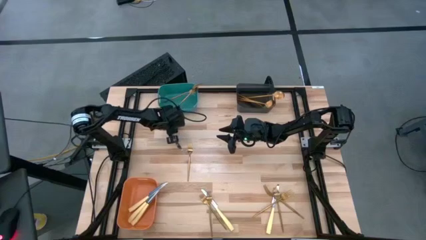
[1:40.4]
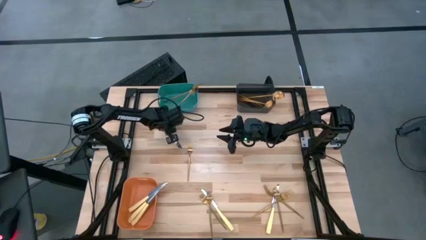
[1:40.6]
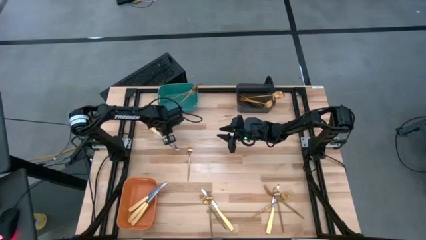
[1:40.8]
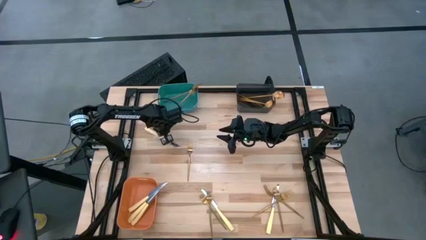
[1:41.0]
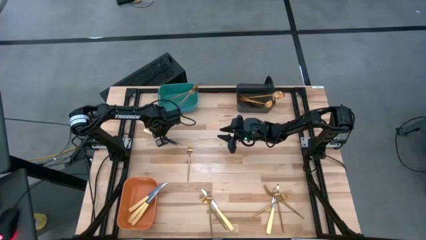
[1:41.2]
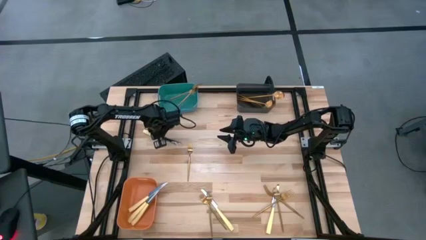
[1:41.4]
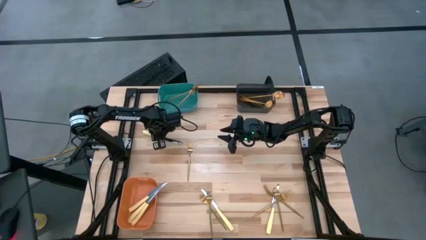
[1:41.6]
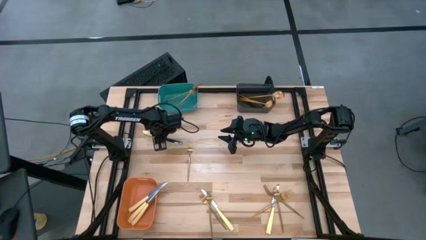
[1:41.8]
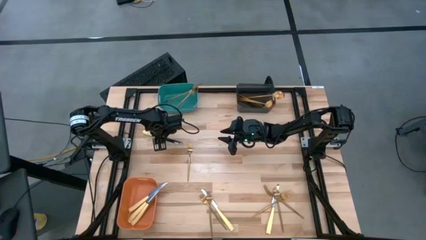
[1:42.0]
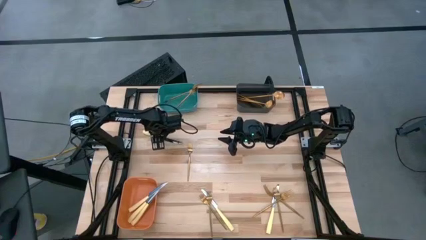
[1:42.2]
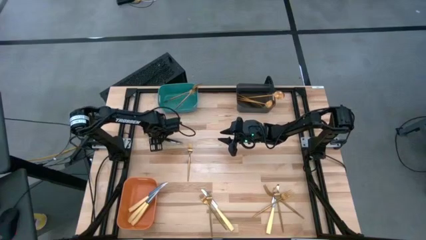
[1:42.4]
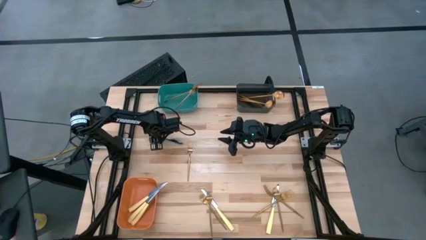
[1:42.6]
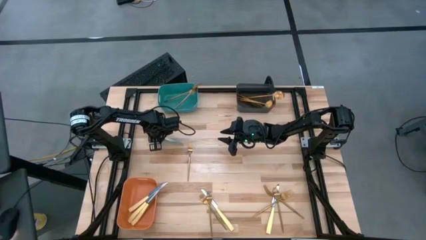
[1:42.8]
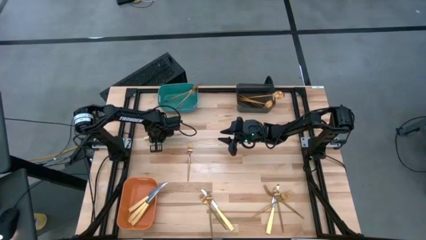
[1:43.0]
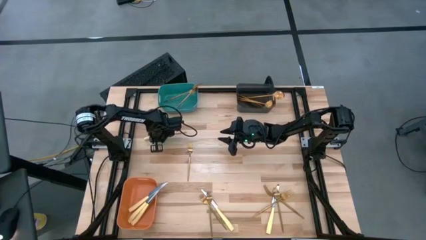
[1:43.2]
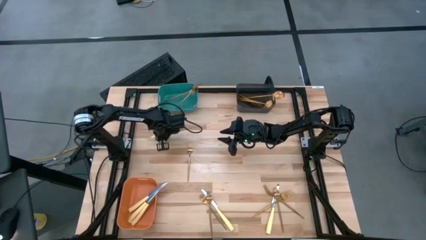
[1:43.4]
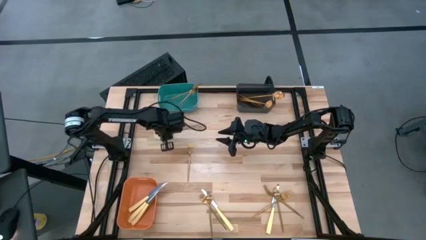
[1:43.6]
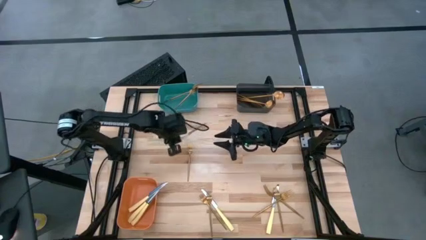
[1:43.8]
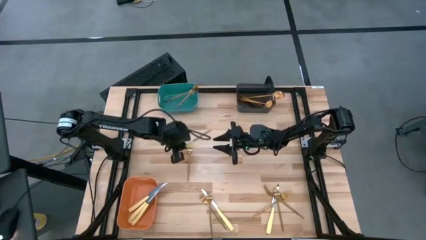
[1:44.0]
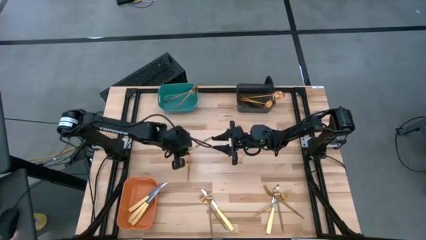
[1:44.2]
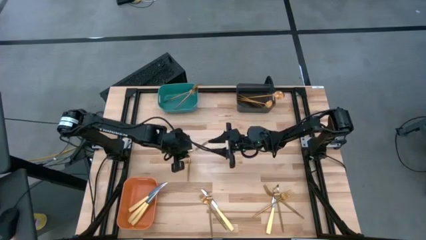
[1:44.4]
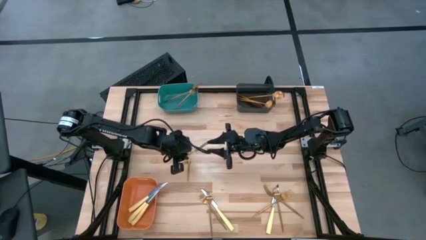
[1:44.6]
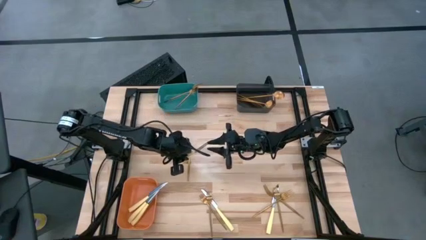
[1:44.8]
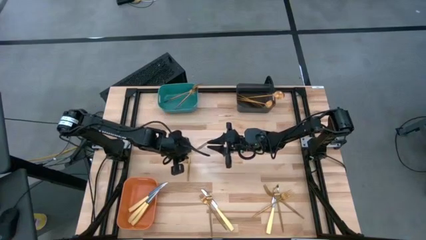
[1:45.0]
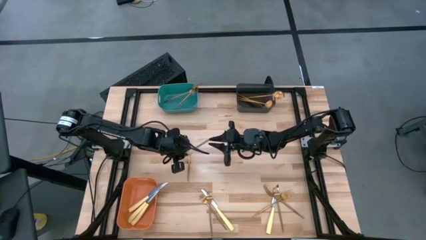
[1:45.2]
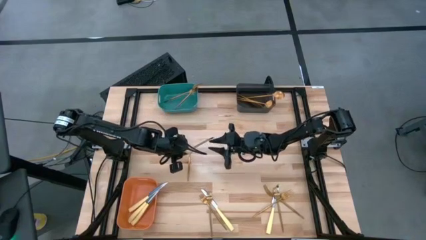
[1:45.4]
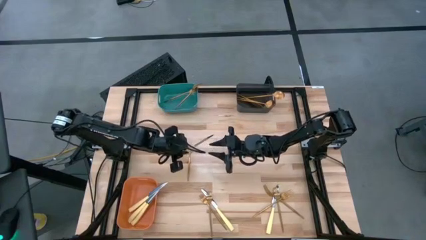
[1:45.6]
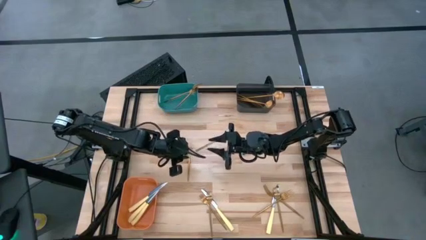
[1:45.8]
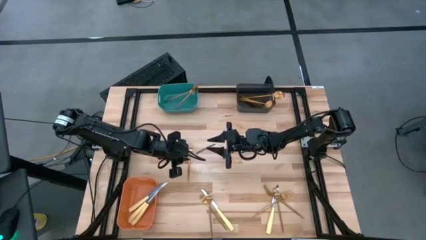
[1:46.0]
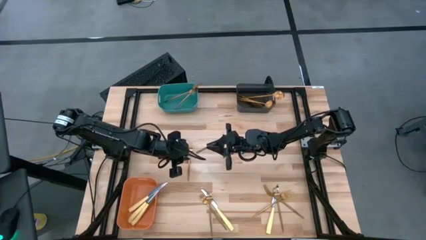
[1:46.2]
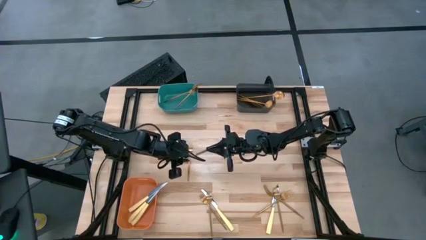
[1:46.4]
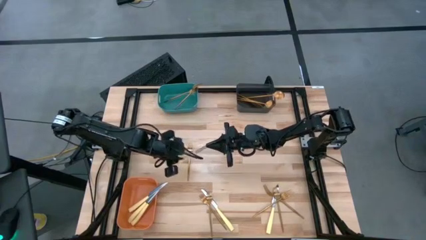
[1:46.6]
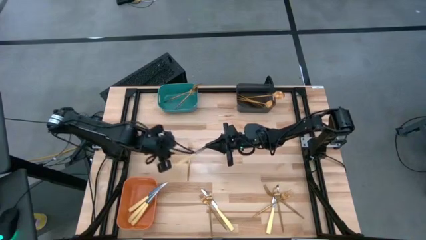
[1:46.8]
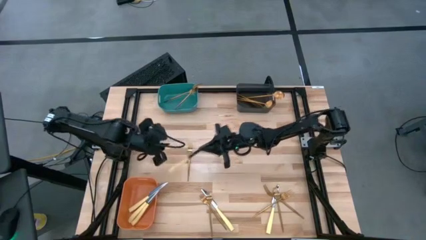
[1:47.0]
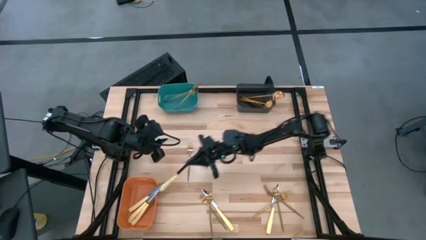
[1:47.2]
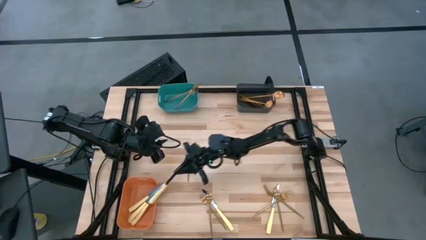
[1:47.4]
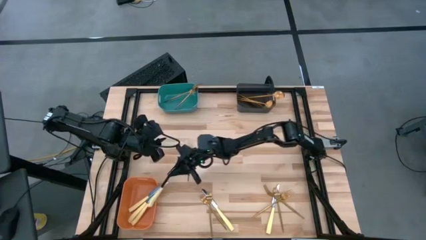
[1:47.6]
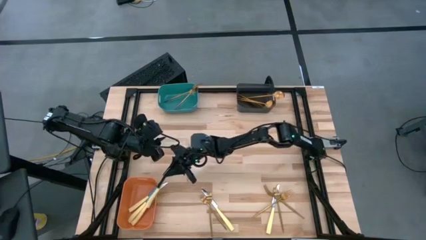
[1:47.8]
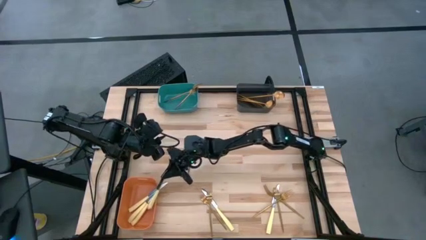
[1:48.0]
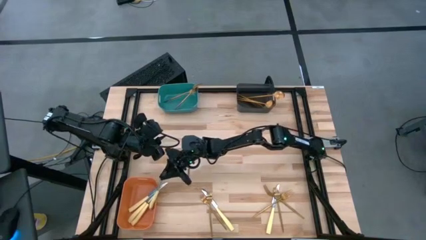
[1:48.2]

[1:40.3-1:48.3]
Task: Sort silverware by color (type)
Put the yellow table knife into the orange bin

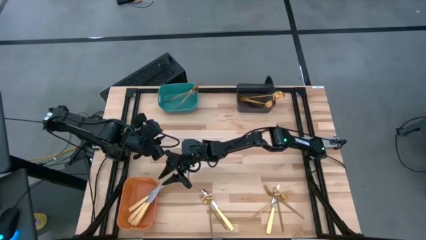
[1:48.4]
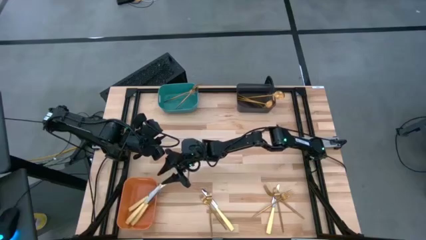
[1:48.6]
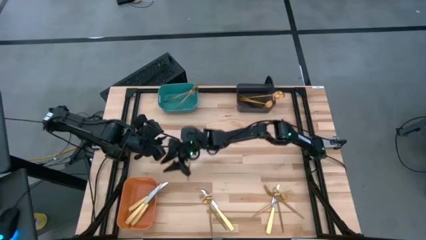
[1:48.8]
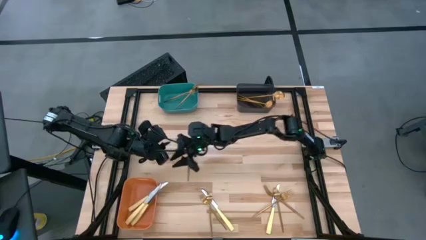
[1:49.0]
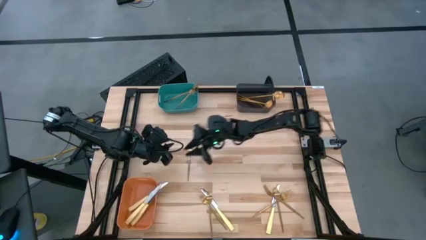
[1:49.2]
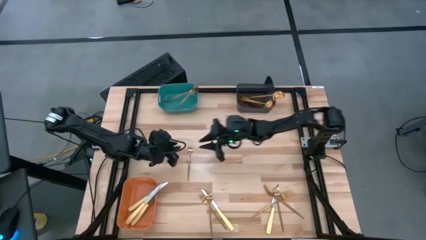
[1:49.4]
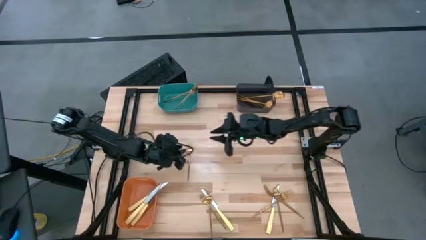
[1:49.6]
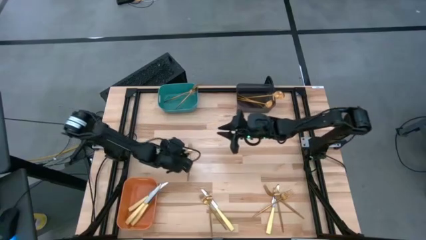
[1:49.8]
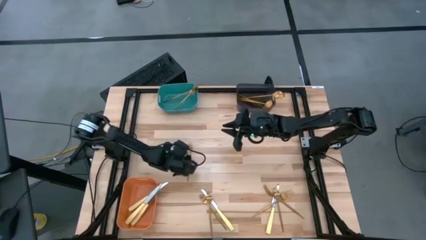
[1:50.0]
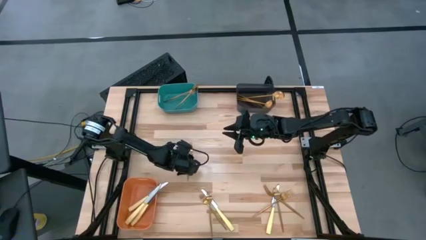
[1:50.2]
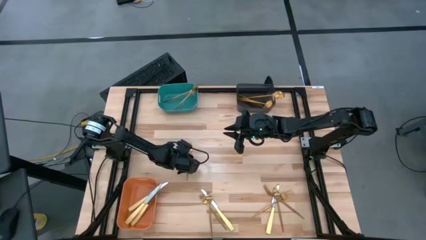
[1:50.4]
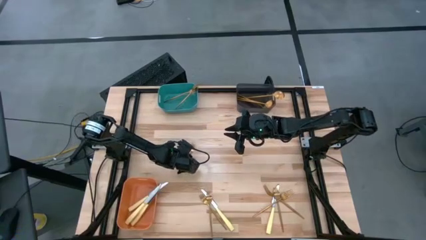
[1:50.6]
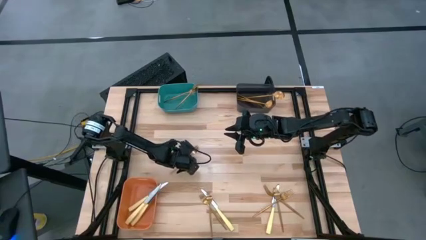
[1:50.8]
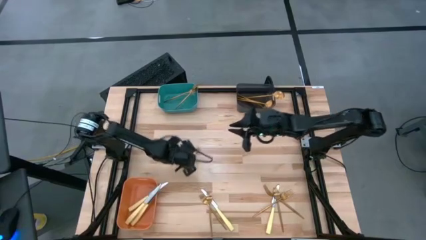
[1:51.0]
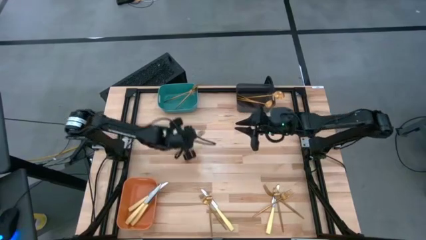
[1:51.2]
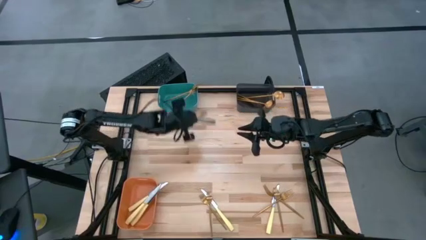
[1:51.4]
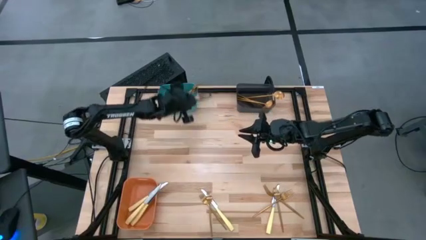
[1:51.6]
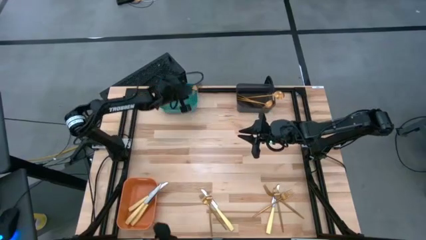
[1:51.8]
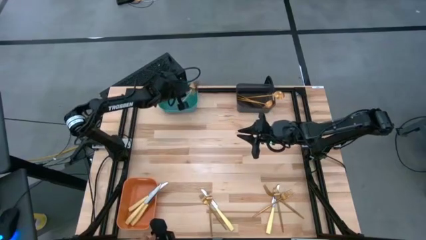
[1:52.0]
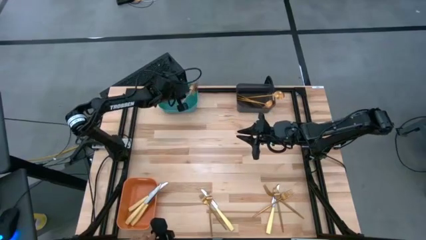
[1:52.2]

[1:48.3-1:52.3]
Put the gold fork into the green bin

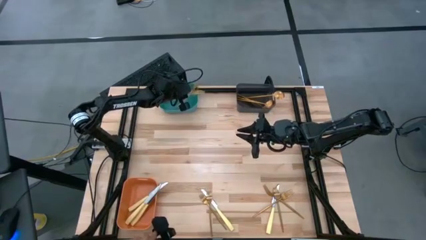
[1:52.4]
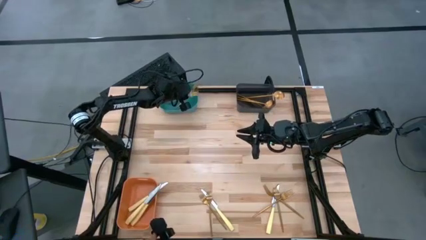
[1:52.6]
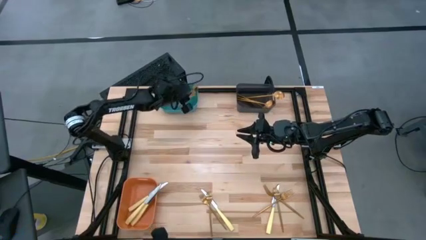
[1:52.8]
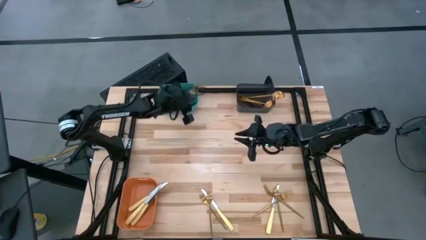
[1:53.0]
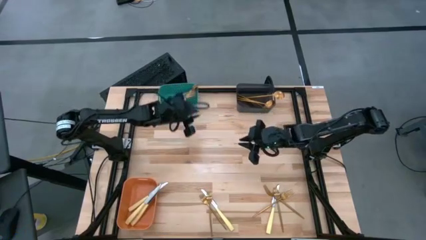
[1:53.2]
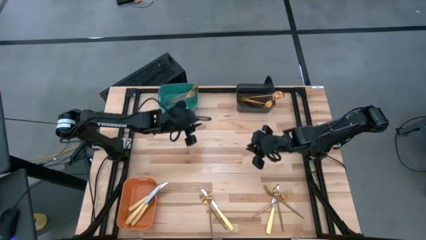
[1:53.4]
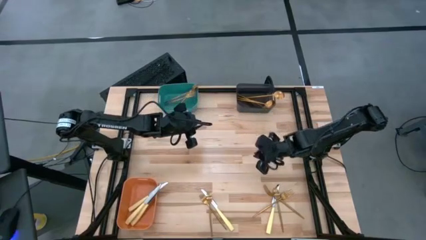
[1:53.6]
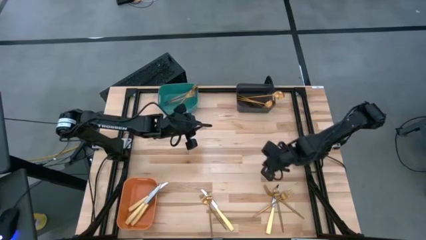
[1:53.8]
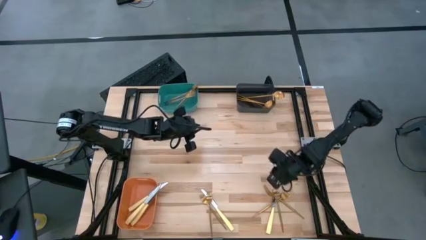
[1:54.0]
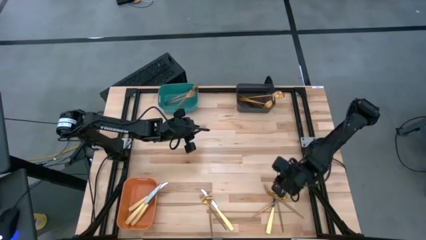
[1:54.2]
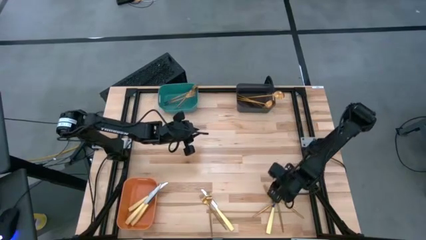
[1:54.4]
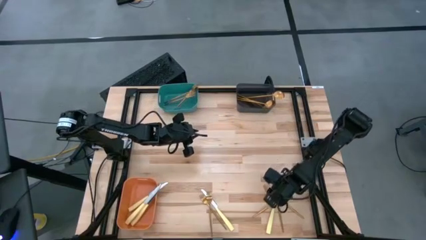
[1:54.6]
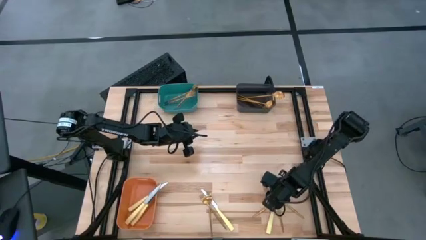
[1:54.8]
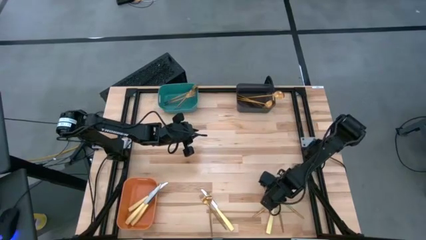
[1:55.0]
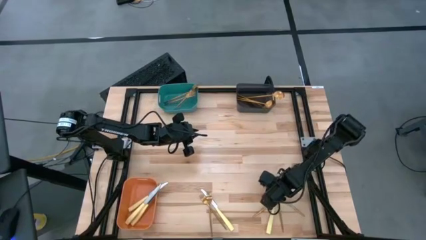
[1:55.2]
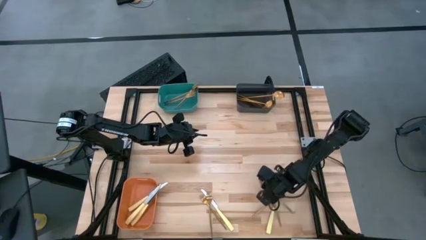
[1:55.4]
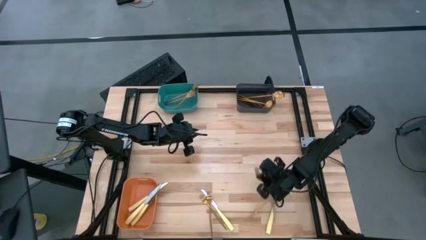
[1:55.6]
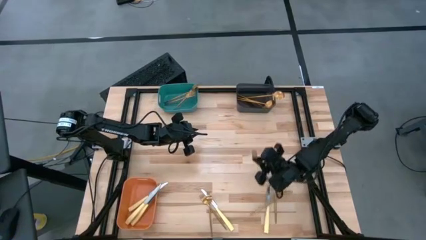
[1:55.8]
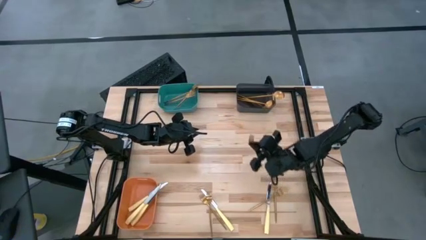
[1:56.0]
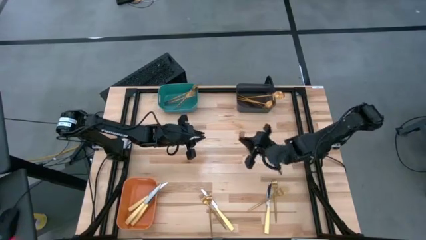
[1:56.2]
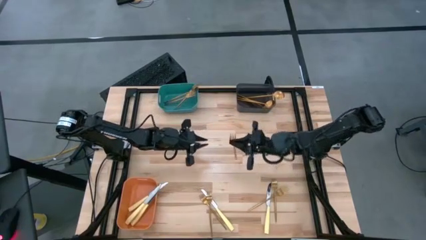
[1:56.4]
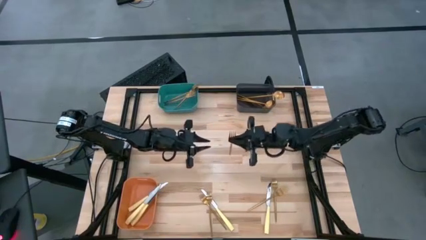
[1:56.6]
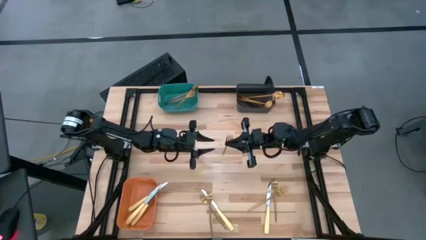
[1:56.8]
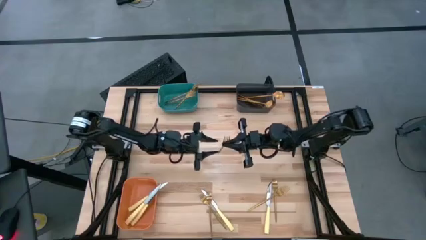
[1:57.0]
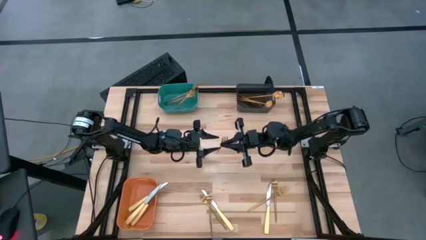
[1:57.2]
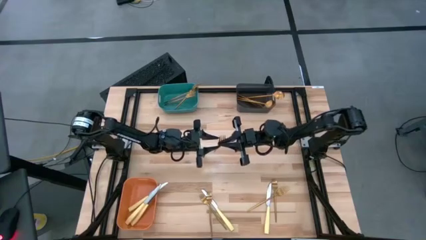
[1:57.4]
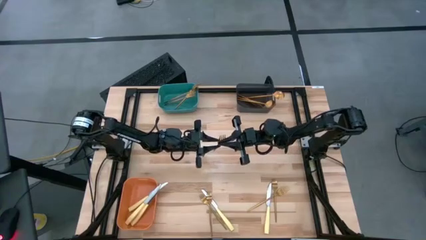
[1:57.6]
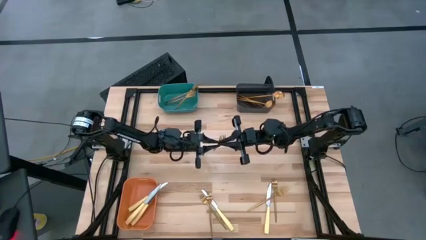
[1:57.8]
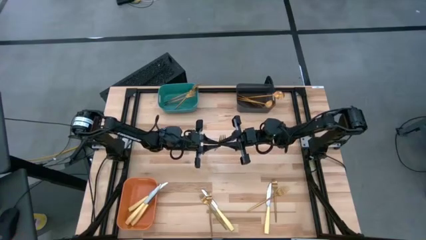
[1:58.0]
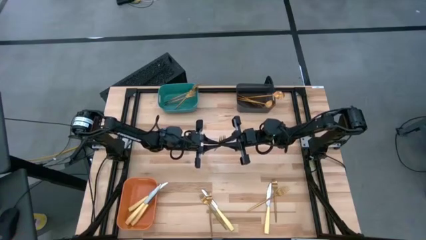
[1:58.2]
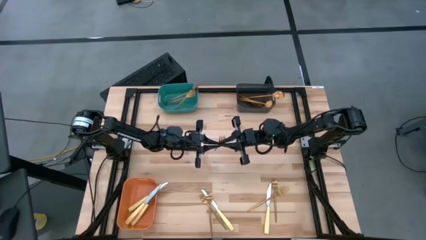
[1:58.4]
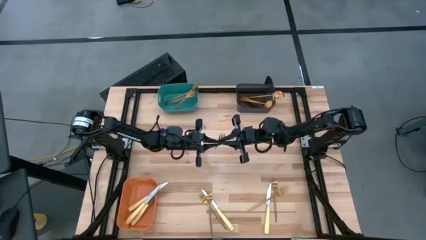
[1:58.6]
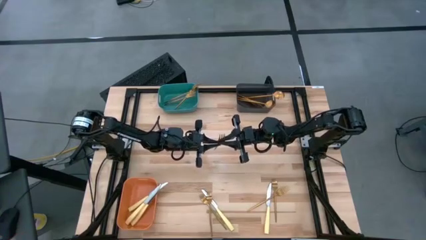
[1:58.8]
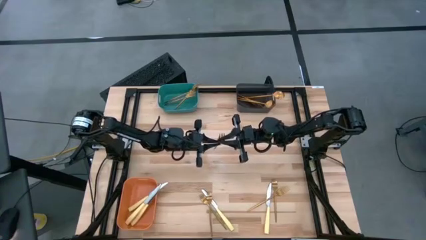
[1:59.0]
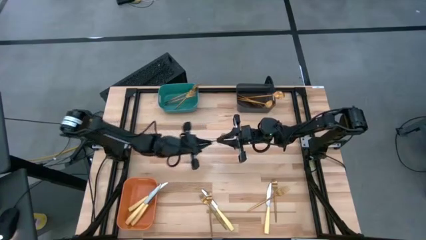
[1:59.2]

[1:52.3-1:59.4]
Put the gold fork into the green bin
